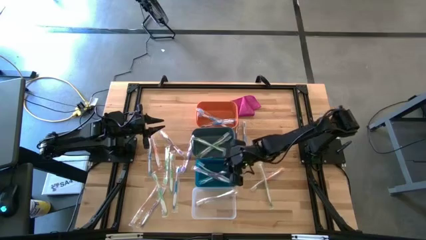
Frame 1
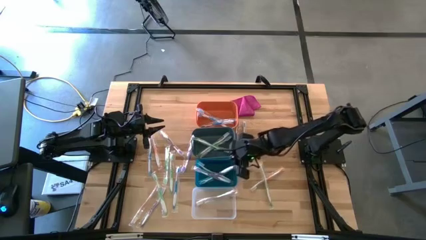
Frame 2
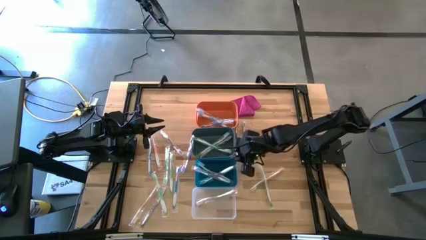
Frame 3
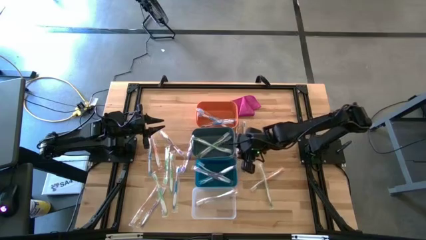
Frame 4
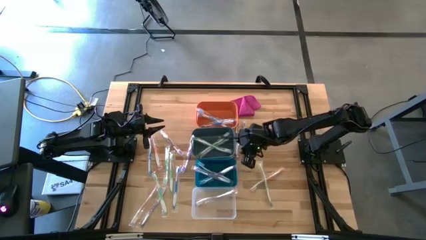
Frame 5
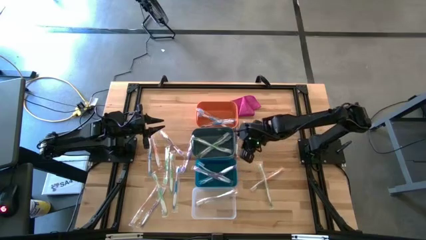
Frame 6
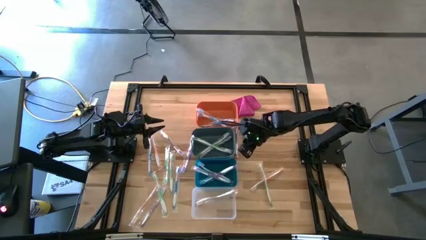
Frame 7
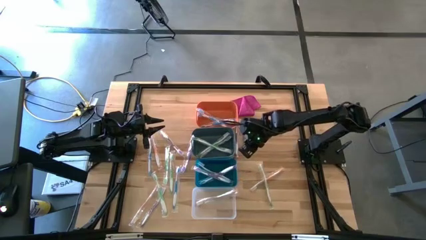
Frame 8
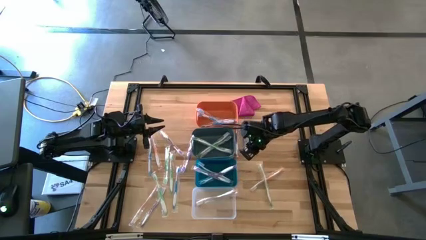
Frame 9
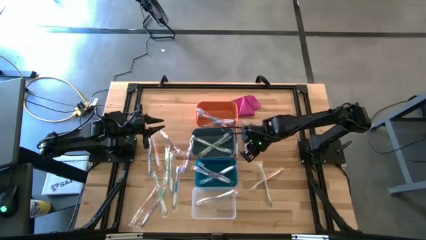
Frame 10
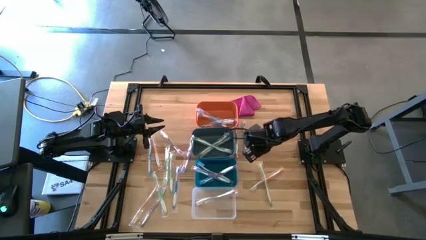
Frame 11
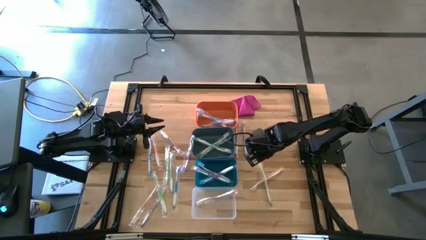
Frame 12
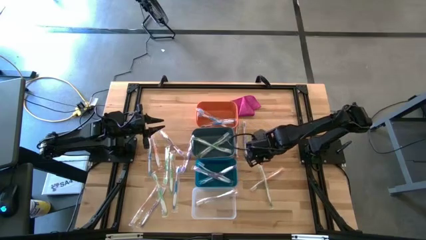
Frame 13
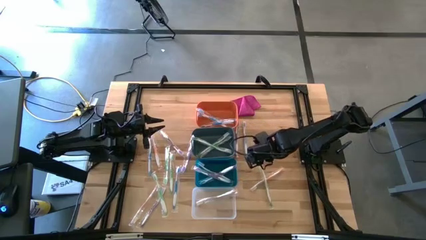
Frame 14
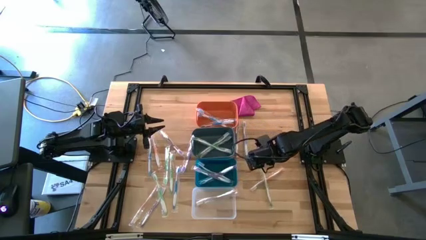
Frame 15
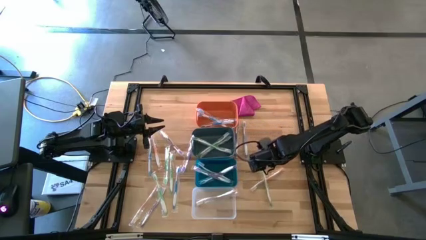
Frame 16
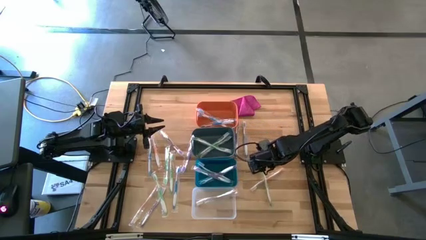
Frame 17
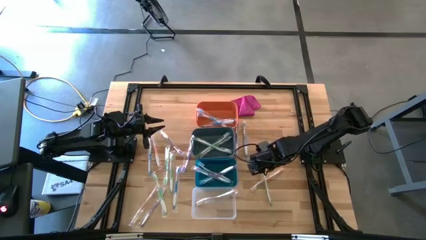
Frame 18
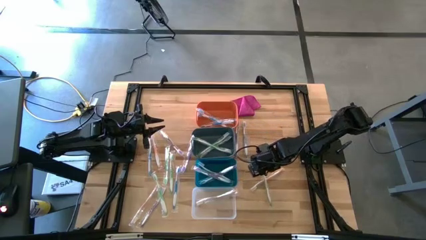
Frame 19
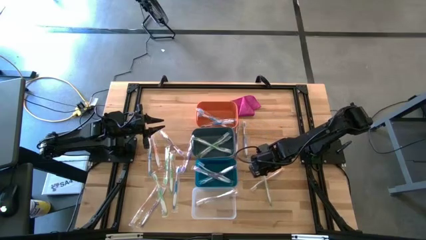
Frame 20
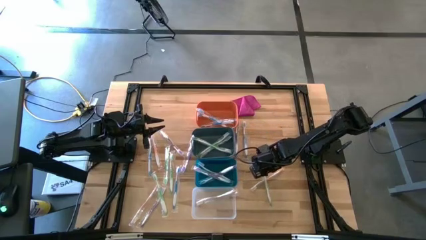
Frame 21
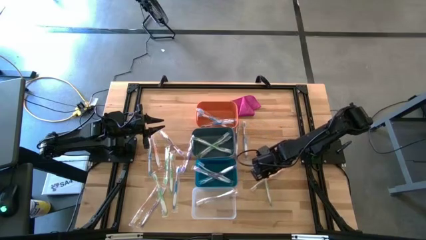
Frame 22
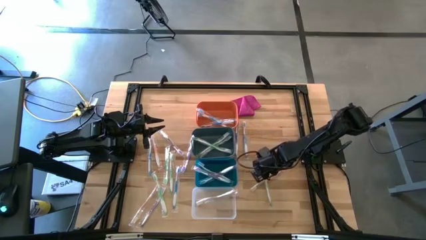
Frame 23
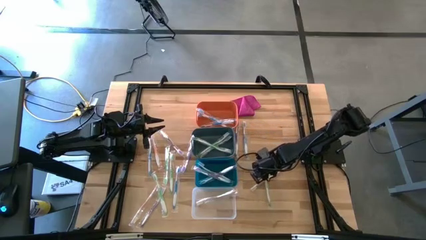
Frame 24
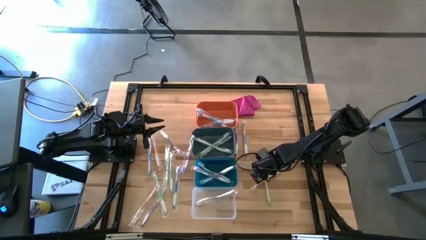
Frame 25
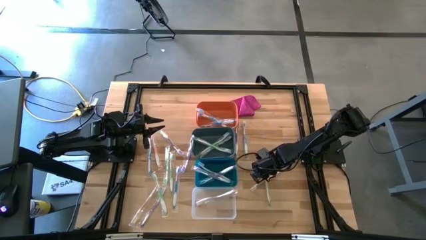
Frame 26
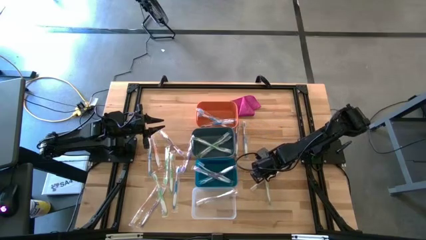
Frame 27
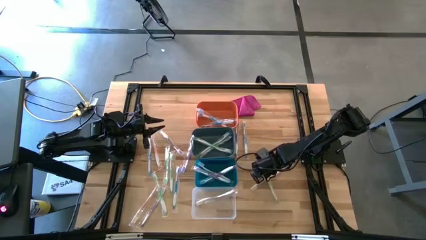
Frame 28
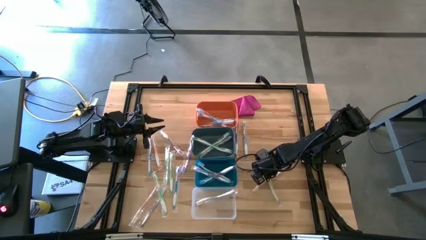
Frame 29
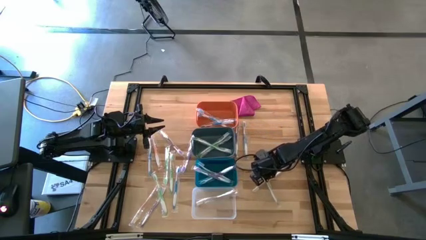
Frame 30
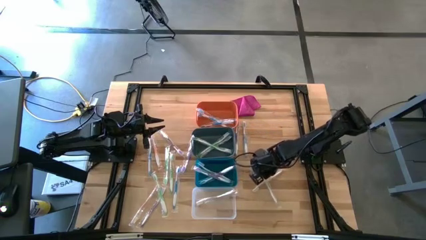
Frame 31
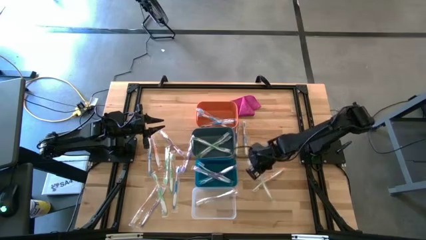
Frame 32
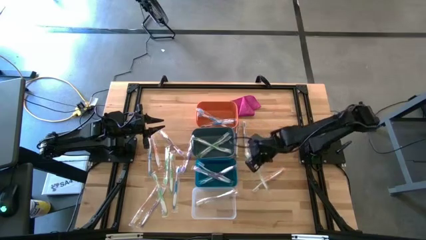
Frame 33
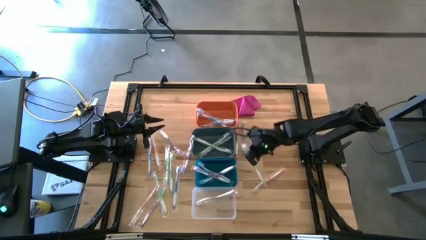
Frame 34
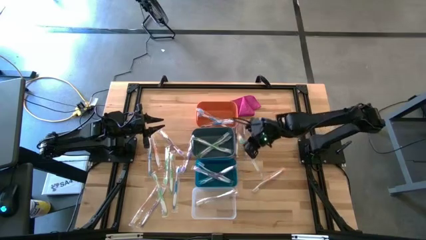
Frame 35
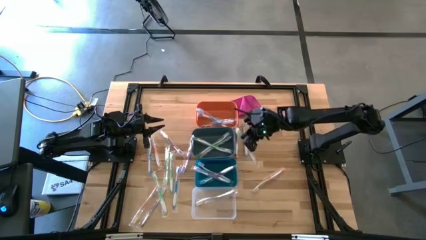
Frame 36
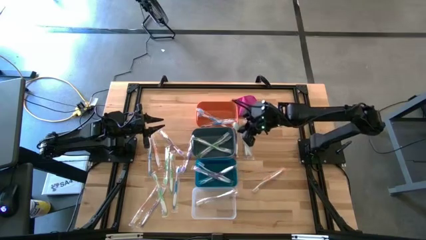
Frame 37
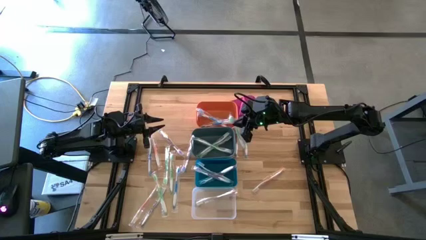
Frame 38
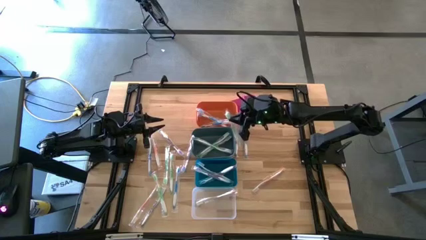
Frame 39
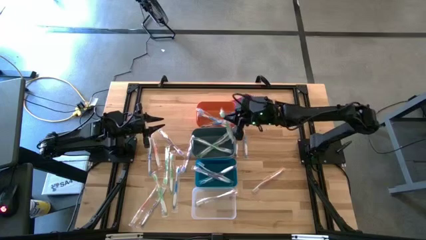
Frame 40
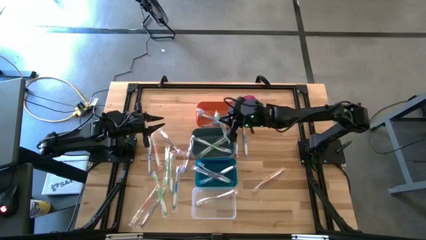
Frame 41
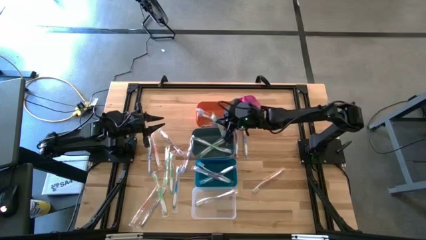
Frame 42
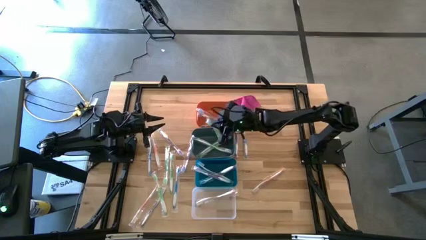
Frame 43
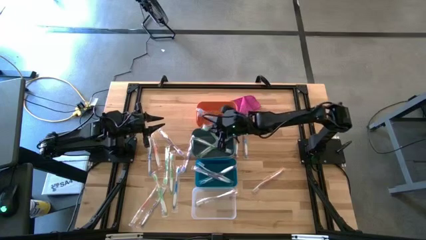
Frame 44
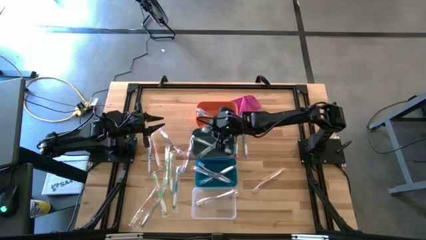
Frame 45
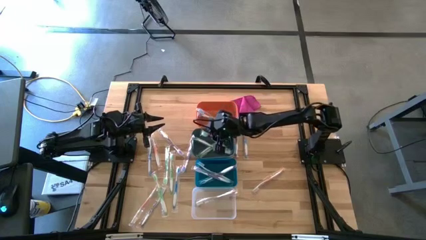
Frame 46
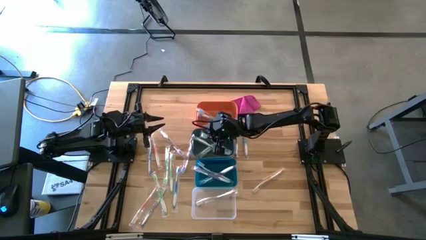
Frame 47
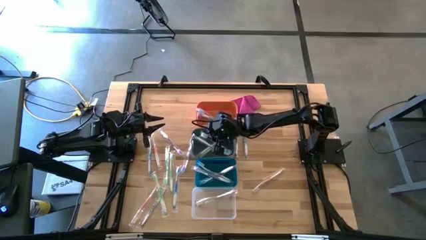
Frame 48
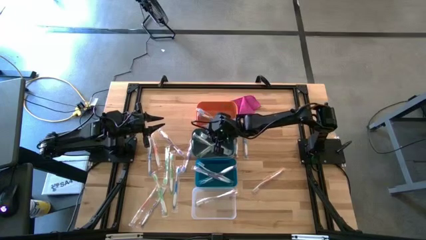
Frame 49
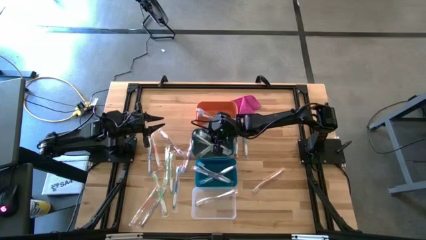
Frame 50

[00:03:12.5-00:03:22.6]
Task: Pick & Place Toothbrushes
Put the green toothbrush into the green bin

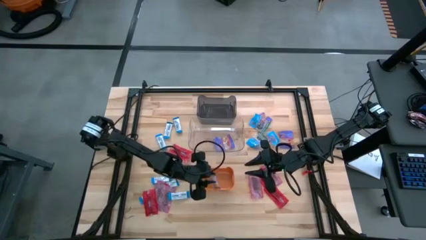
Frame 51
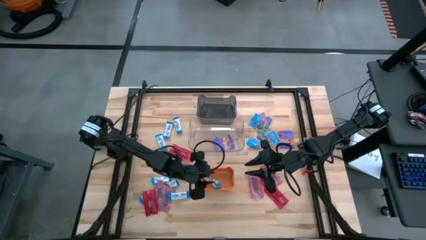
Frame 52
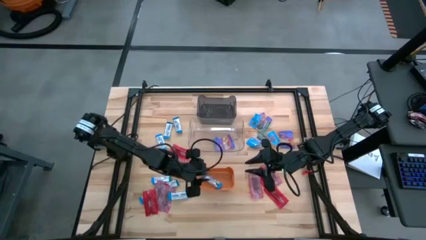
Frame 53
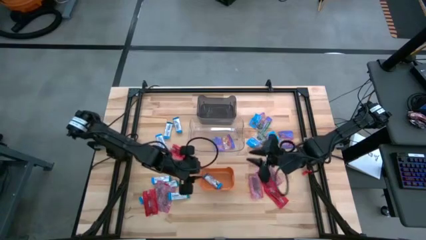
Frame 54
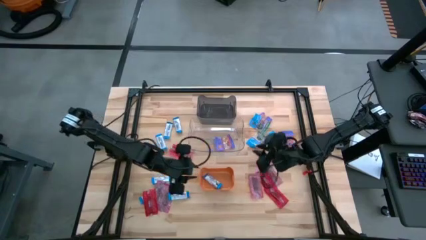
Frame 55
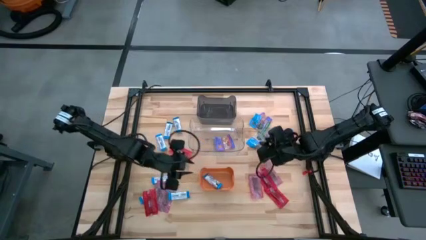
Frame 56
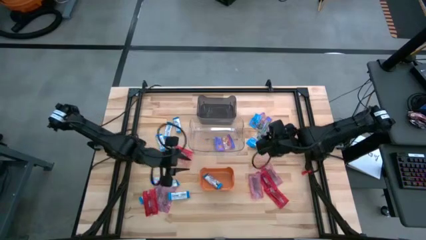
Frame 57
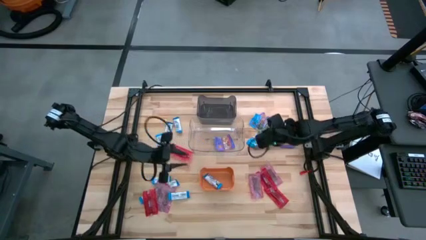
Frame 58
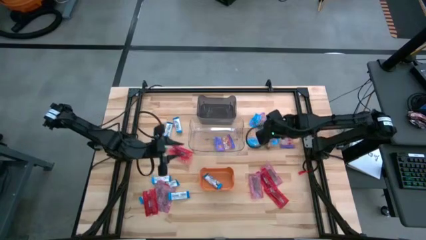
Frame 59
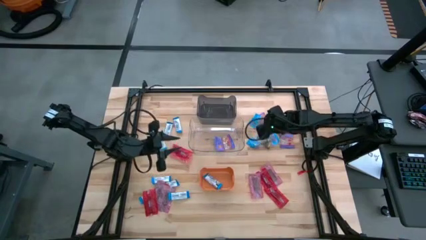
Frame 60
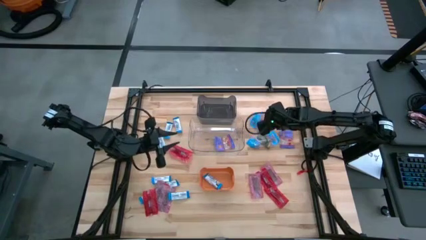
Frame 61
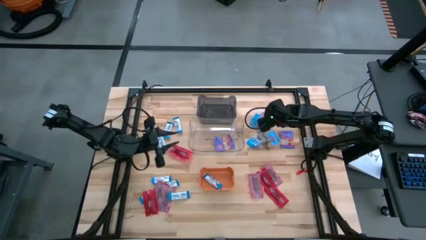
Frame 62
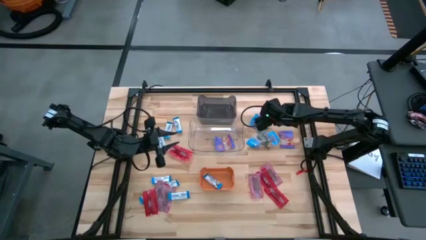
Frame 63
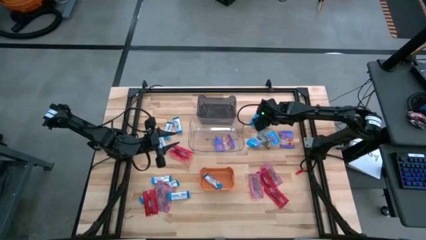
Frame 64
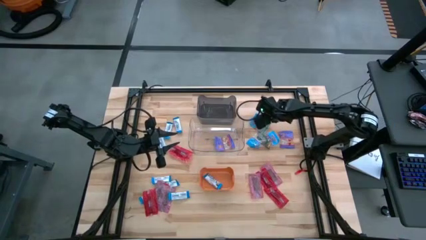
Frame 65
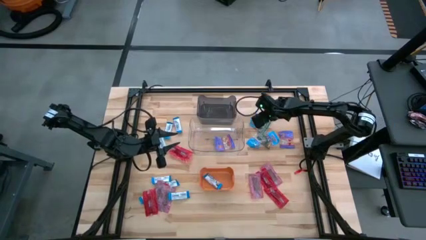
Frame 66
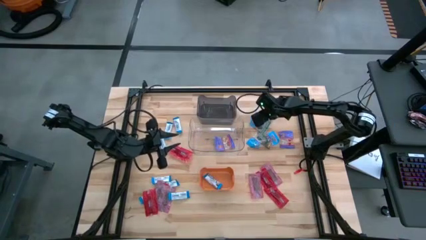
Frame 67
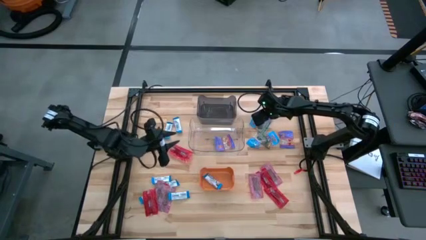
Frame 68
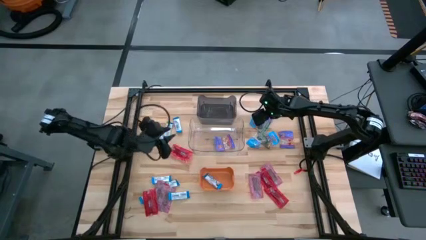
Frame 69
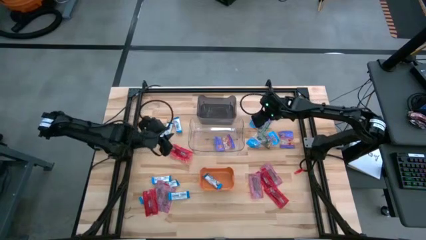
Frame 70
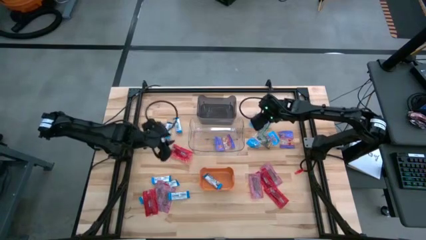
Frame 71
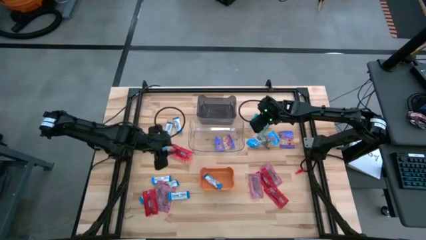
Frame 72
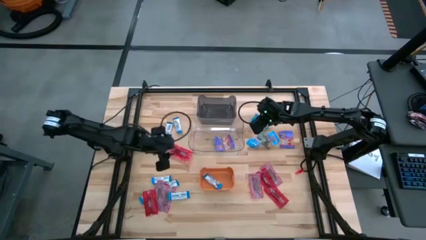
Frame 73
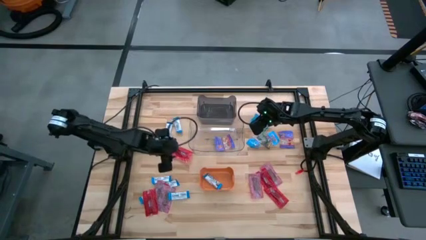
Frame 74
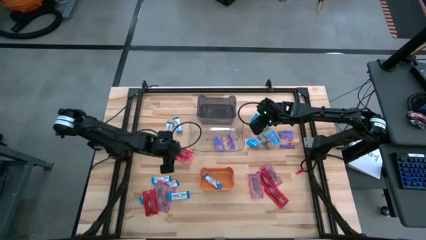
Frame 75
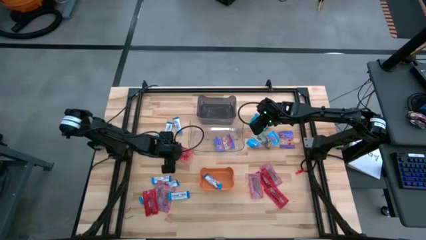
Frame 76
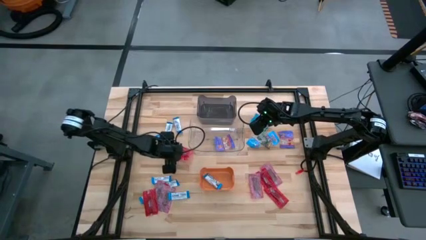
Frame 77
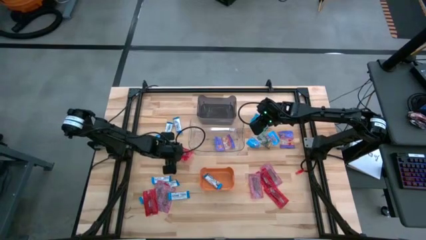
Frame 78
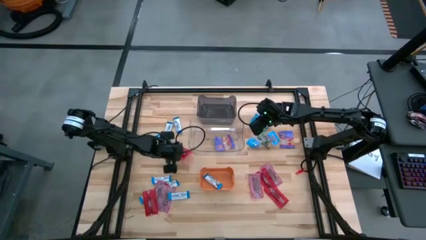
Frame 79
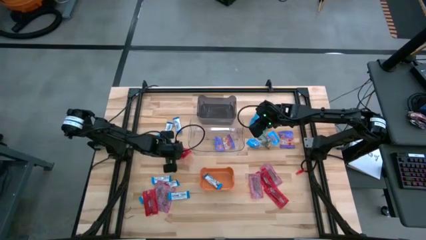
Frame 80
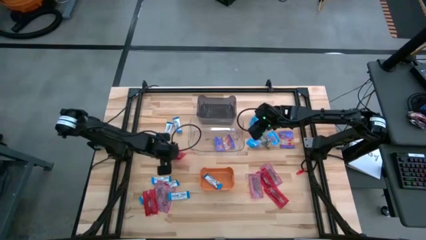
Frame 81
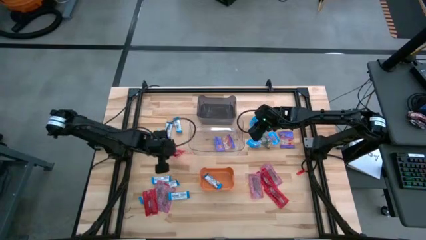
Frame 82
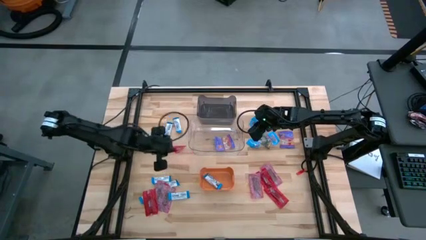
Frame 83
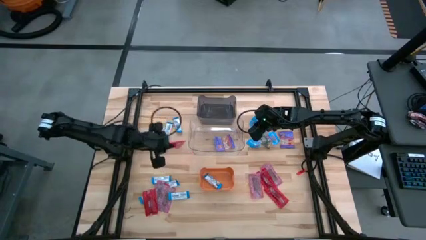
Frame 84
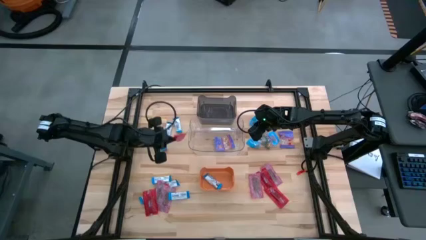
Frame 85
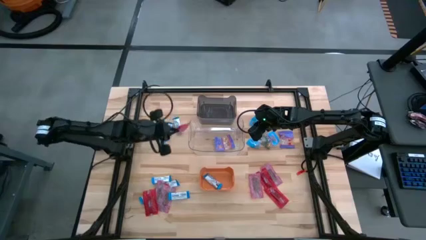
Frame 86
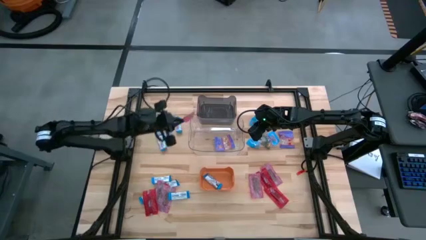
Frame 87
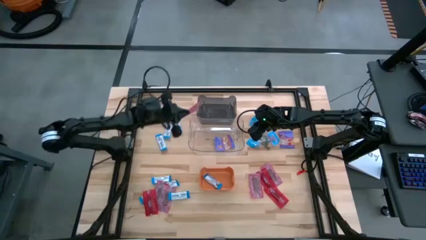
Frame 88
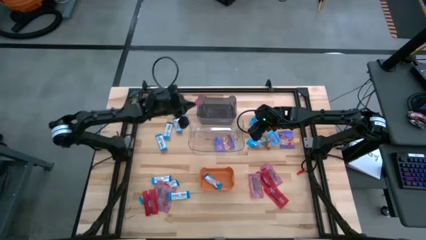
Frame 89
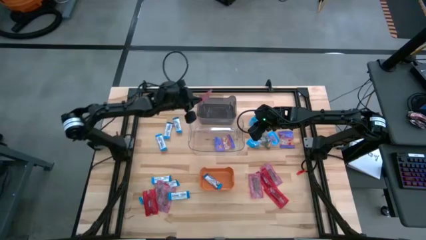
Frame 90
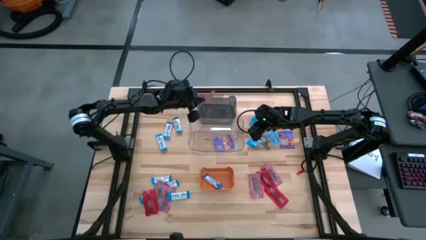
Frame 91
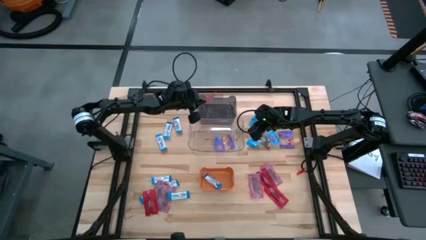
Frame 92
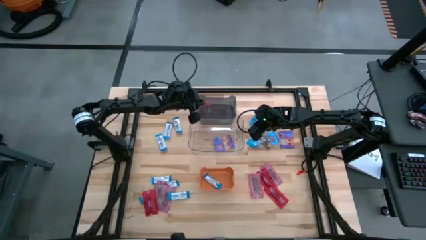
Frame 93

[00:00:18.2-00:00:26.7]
Task: Sort candy
Put the red candy into the black transparent bin
